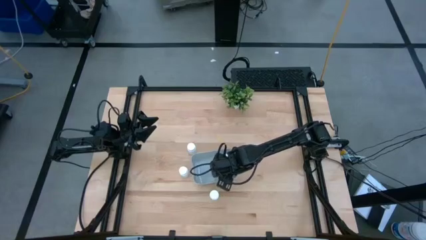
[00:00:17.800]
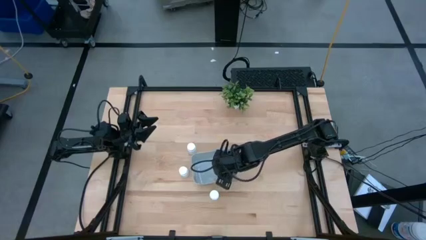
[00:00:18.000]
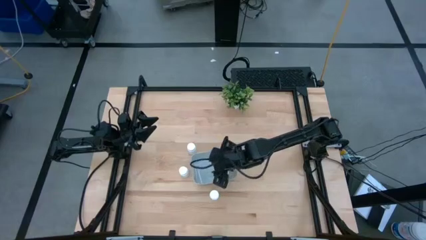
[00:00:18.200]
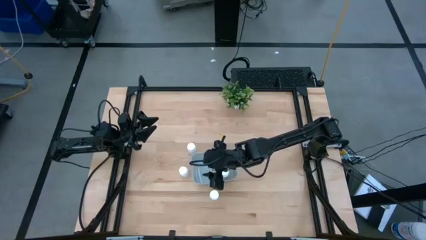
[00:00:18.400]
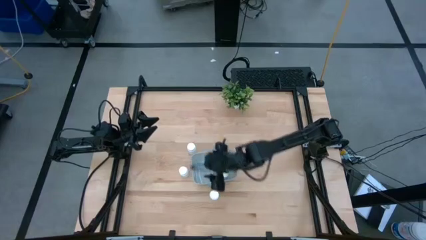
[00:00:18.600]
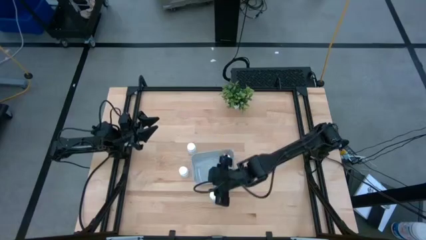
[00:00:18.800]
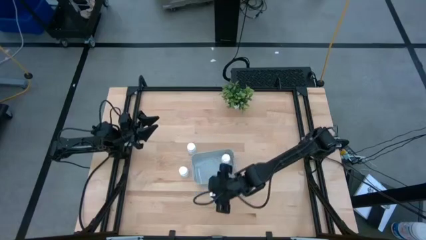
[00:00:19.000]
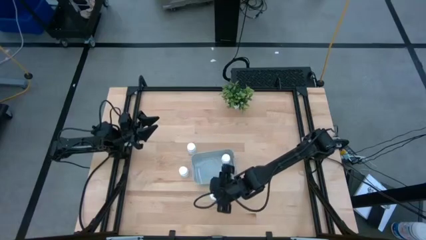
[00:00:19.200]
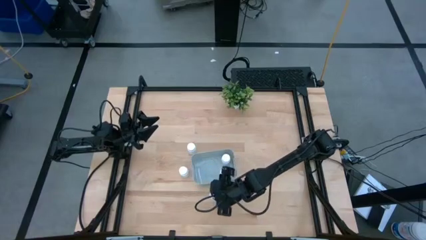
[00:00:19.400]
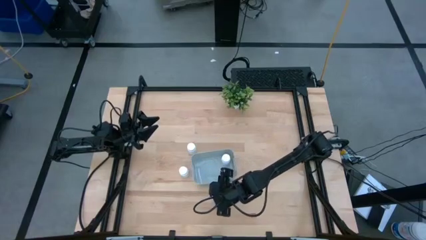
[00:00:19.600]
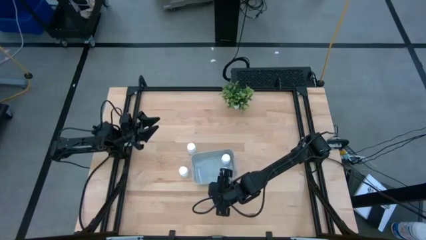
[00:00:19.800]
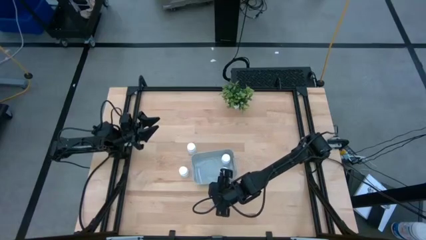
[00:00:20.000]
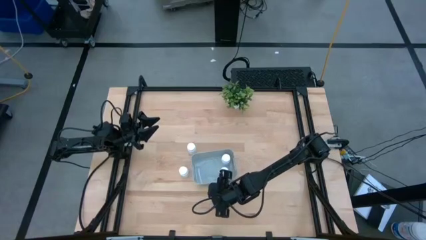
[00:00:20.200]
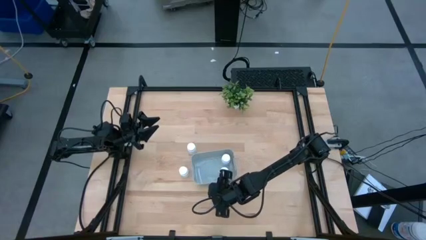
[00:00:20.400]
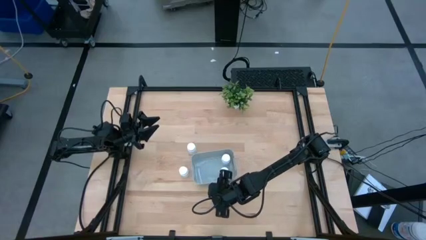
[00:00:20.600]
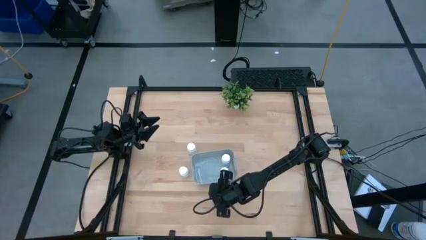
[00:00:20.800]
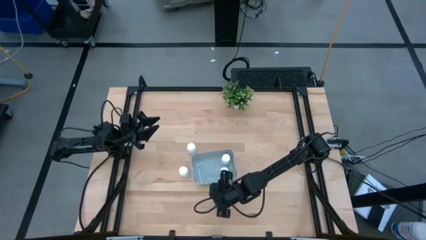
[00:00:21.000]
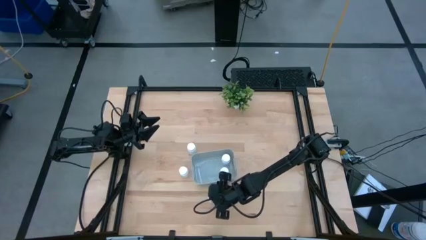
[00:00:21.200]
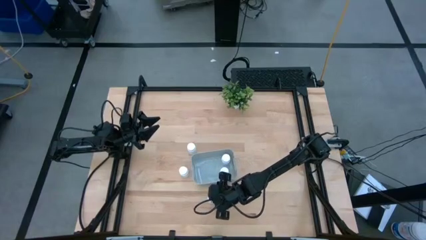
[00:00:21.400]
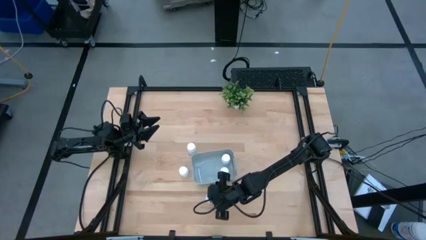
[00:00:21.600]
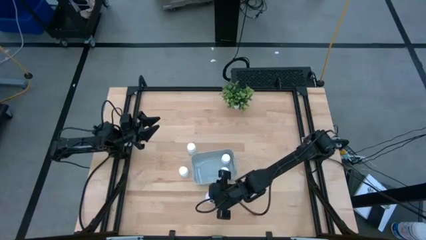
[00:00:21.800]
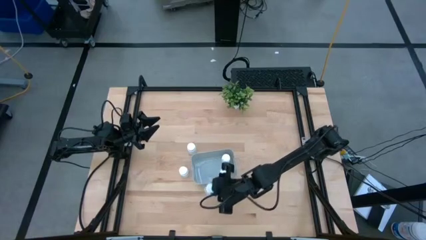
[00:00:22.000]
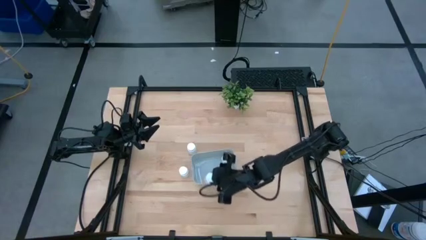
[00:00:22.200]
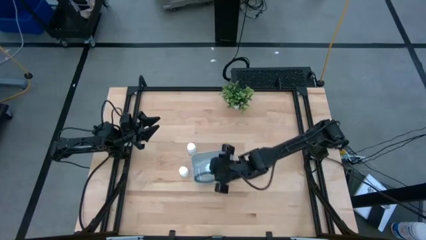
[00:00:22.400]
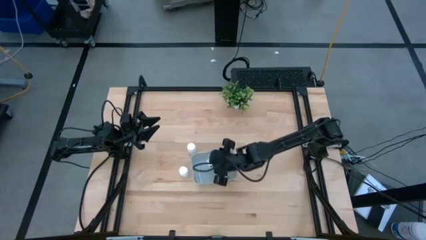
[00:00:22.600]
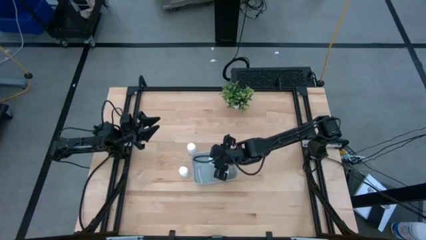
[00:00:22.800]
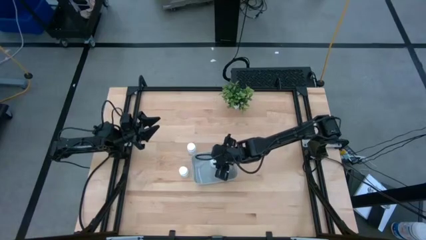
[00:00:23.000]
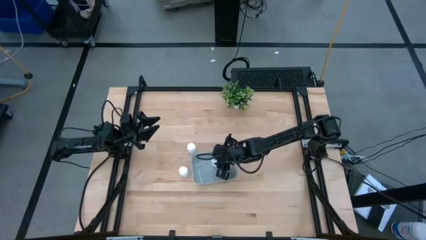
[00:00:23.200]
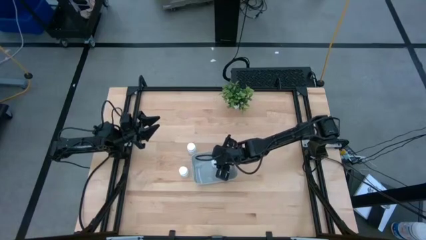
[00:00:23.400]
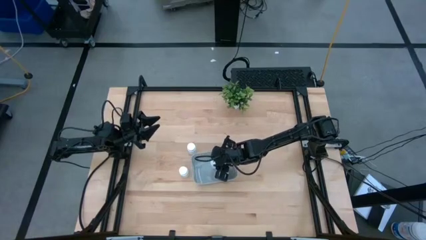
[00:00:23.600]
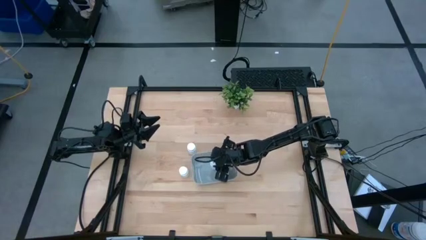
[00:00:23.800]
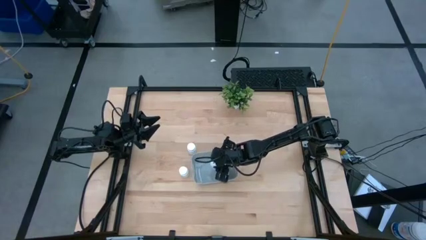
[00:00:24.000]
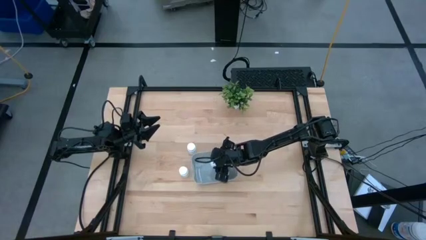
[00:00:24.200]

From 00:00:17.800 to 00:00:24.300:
Task: Pick and place pill bottles into a basket
Put the white pill bottle into the white bin

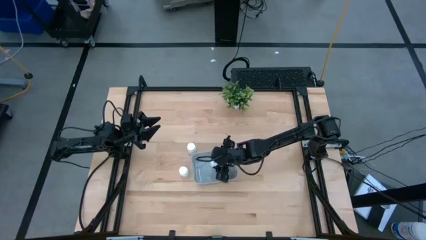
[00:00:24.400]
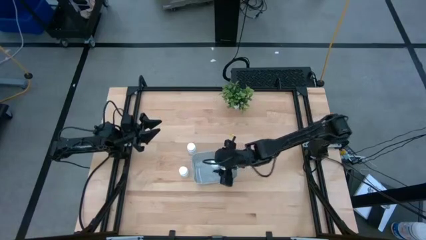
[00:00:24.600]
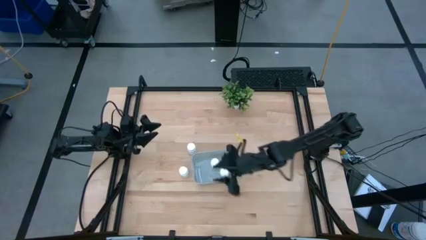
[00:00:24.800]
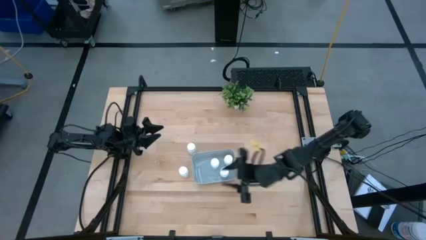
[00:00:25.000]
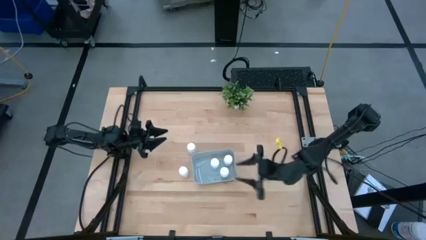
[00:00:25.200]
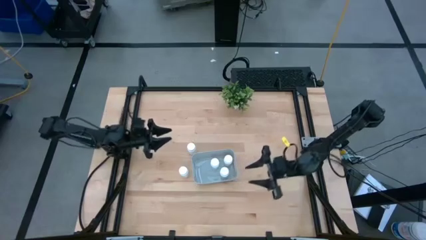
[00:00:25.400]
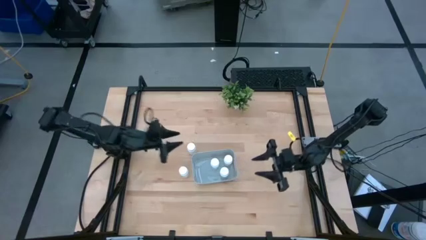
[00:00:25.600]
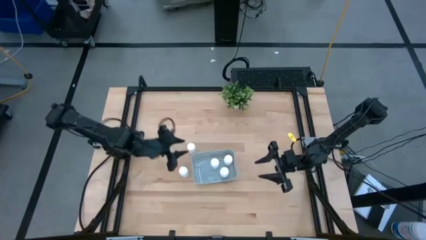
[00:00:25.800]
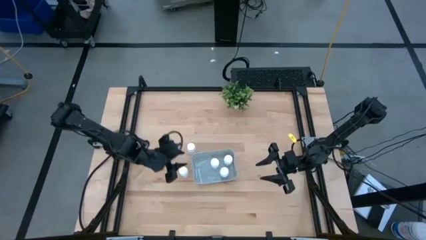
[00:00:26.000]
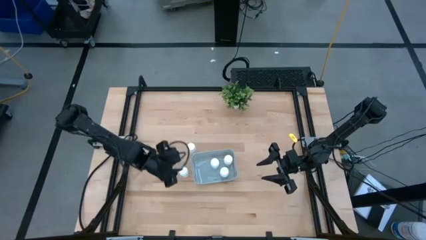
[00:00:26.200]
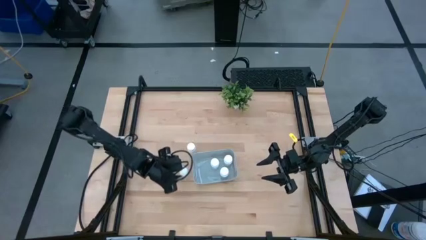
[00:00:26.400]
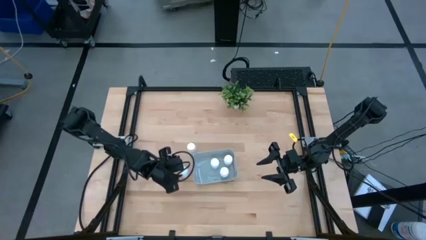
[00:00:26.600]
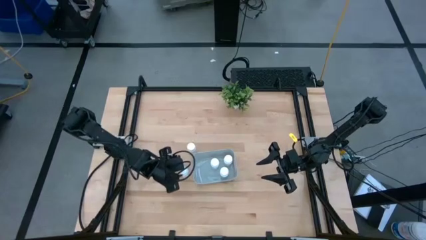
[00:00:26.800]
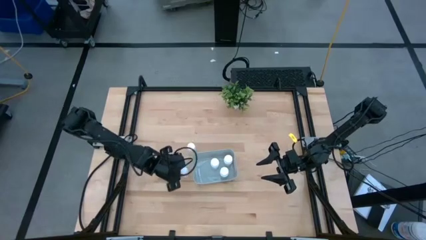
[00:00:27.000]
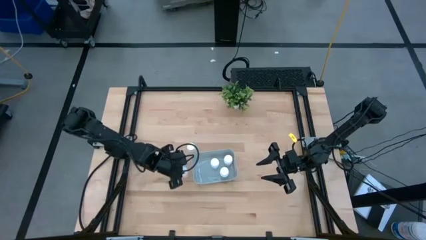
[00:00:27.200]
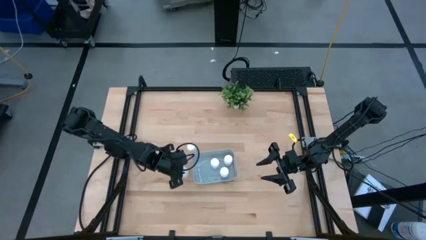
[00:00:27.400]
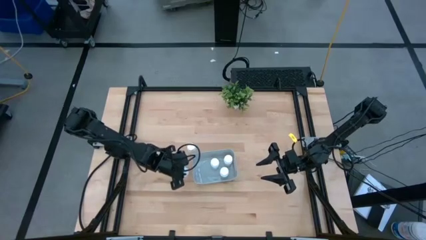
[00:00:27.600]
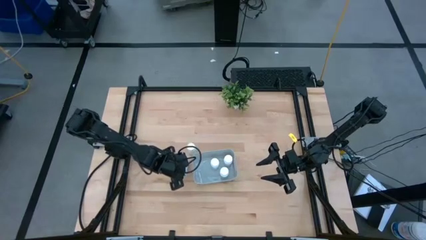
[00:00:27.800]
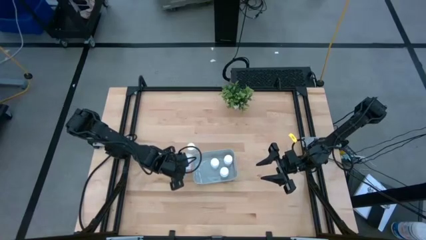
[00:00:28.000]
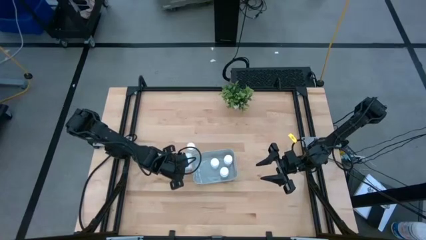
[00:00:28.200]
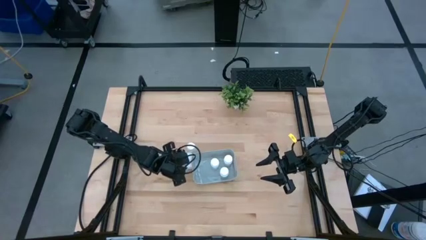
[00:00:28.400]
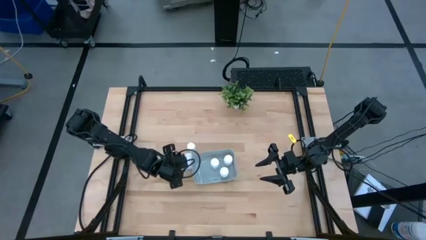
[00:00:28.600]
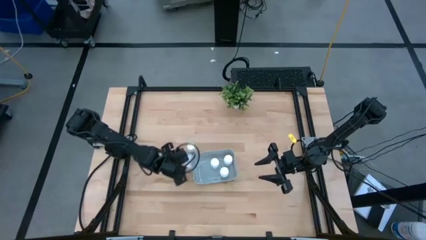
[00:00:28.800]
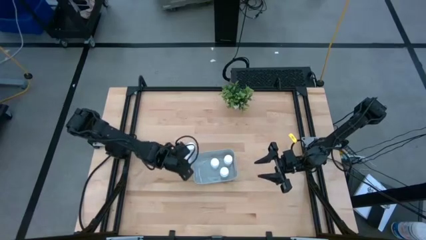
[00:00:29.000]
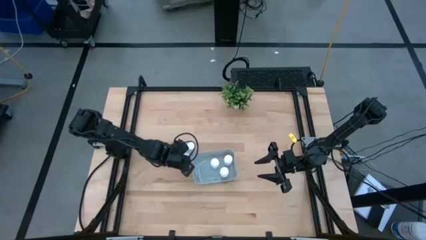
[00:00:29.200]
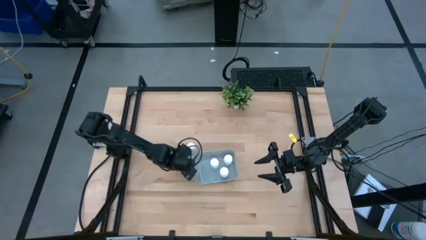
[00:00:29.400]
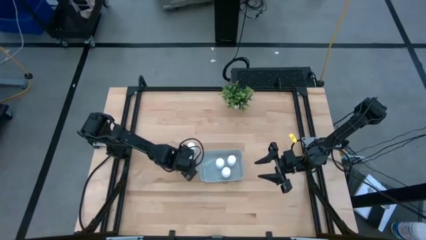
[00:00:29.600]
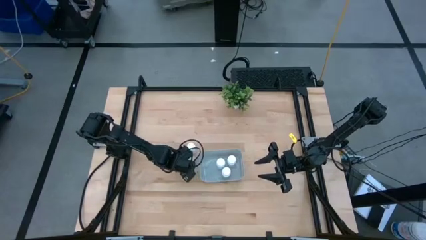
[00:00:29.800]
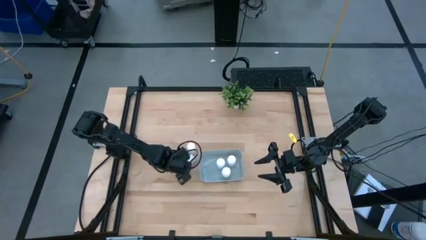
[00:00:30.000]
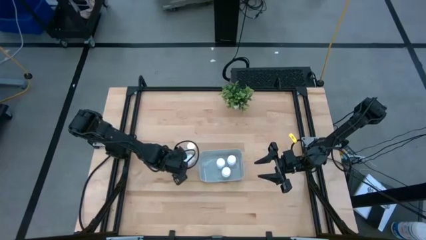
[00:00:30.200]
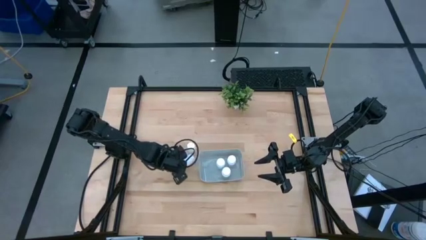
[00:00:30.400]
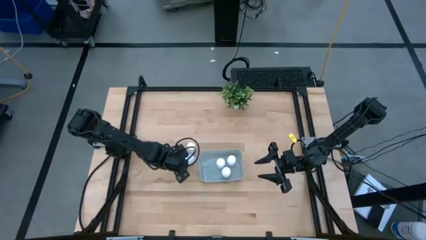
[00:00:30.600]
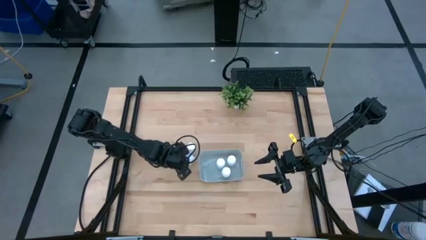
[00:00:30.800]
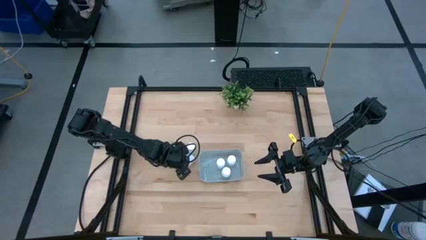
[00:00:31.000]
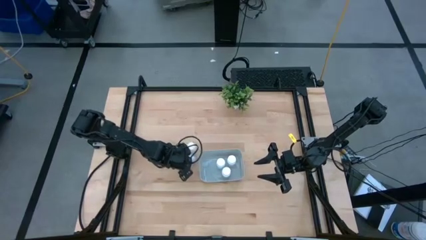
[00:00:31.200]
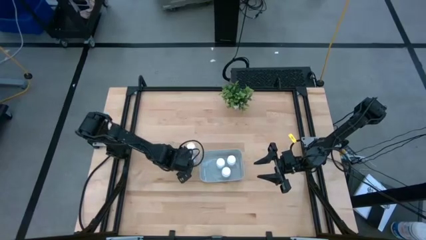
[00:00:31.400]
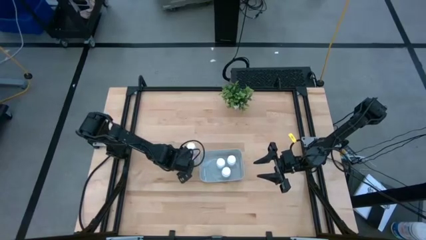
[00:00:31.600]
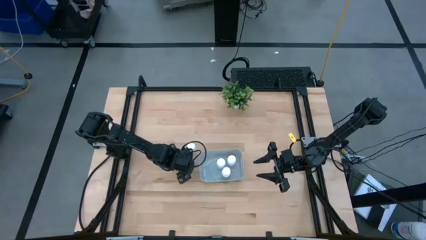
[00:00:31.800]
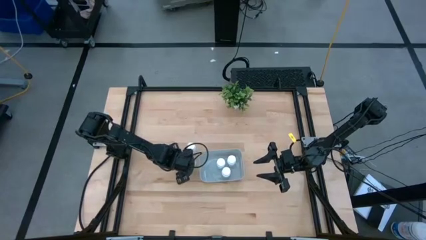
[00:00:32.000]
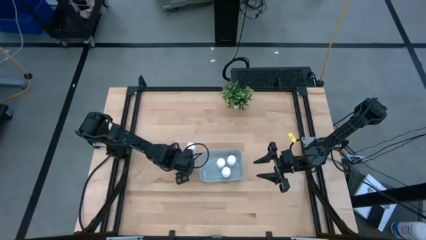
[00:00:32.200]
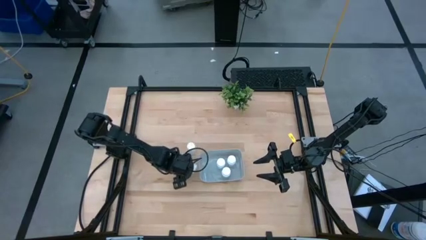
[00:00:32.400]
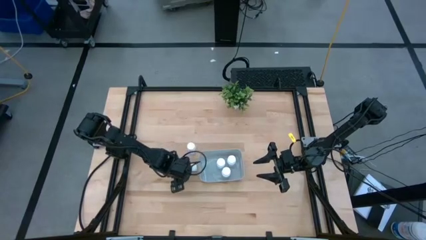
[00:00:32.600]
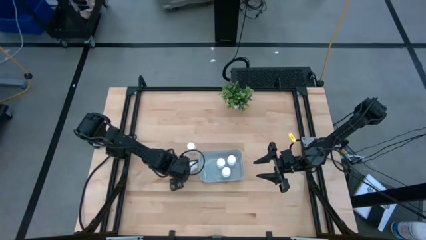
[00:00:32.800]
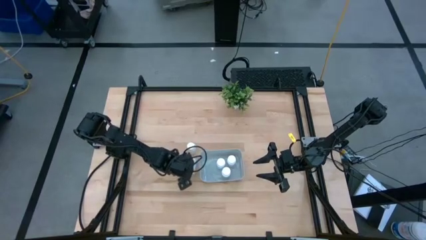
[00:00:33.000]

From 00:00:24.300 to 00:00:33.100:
Put the white pill bottle into the white bin
